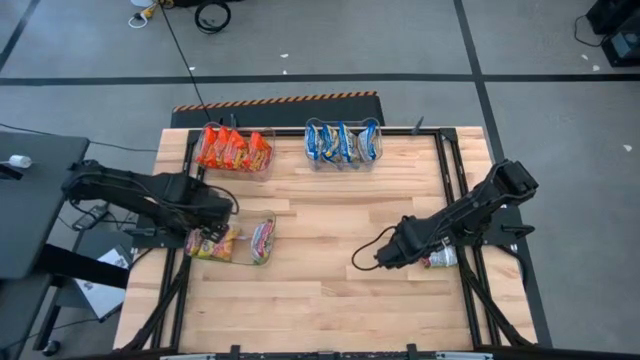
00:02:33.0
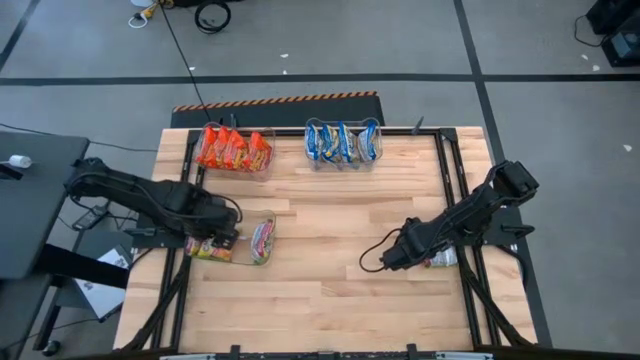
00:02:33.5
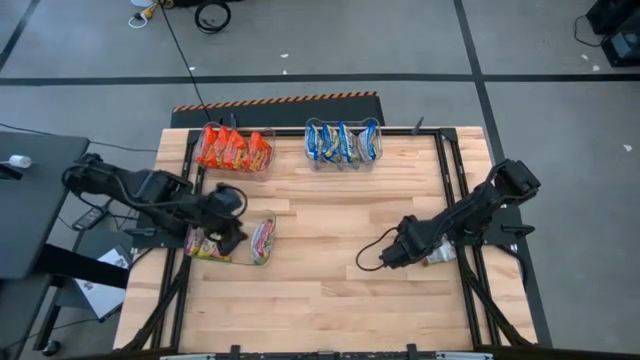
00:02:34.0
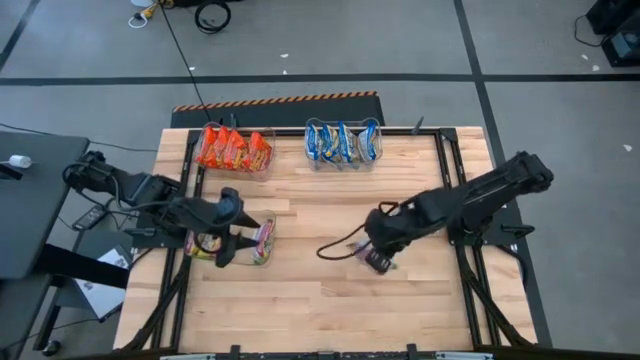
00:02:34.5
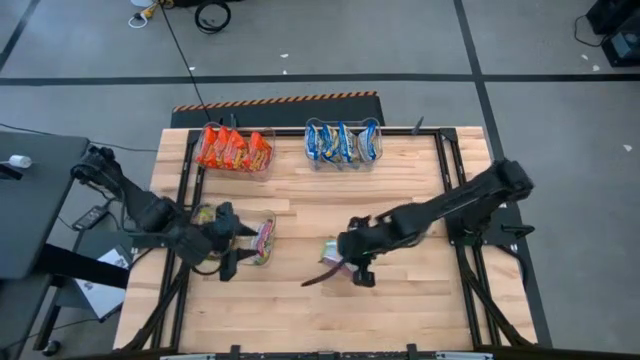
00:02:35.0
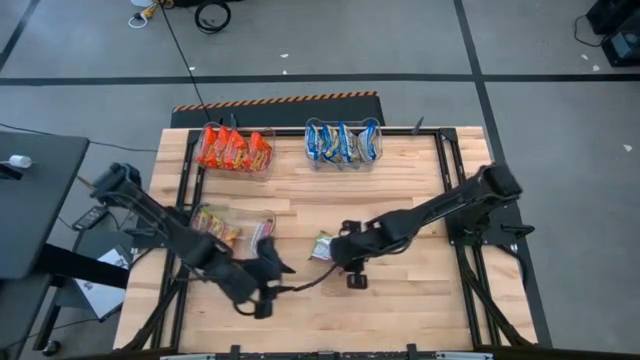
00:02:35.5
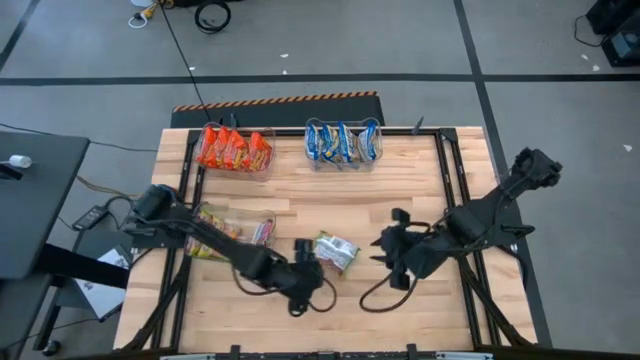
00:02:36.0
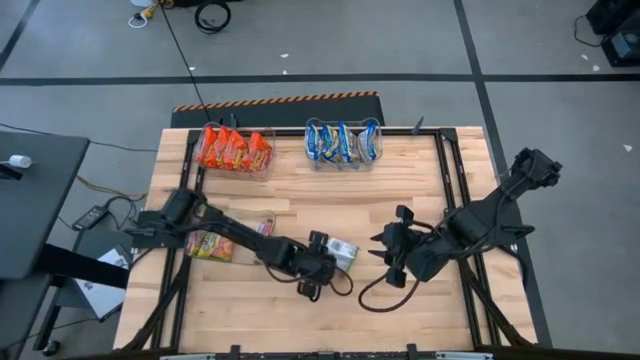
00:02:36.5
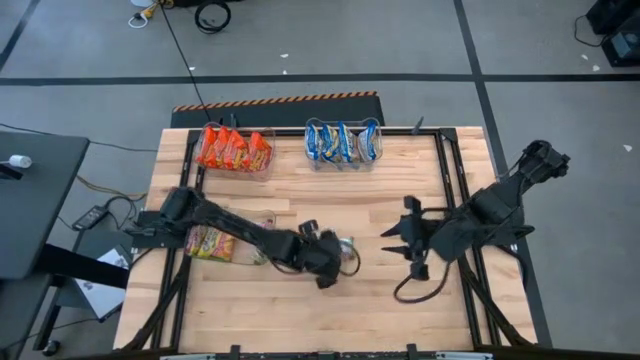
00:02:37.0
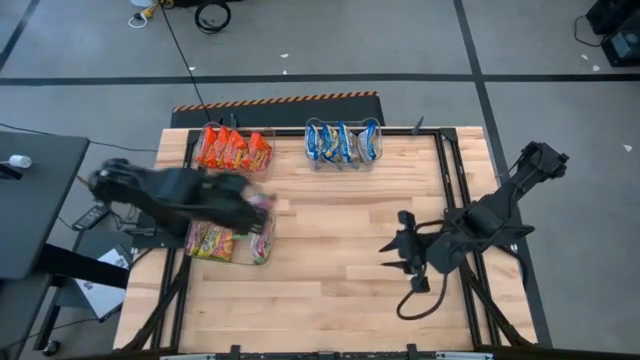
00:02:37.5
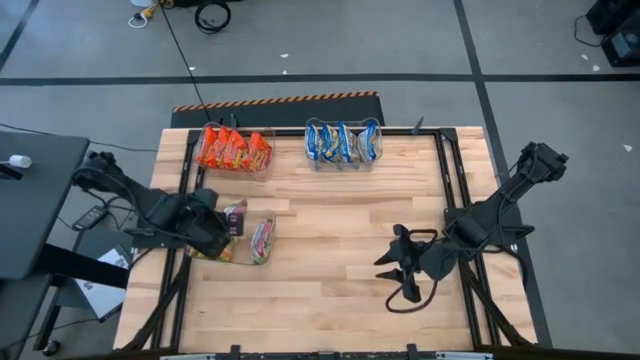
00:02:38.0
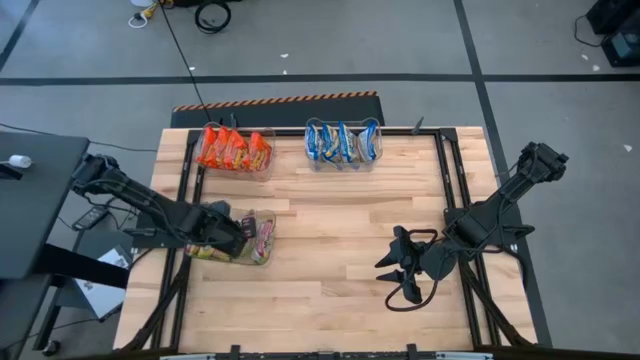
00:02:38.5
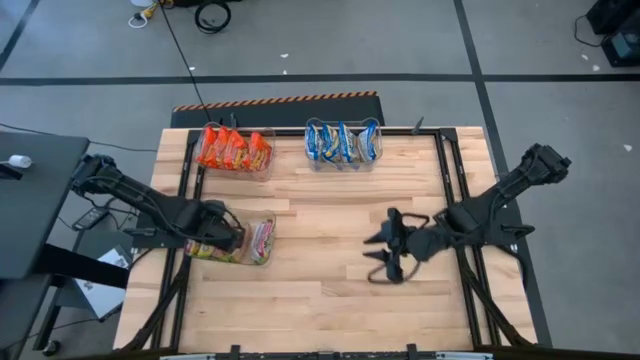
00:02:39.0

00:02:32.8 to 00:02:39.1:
Task: Sort Maruchan noodles
Put the yellow noodle into the bottom transparent bin

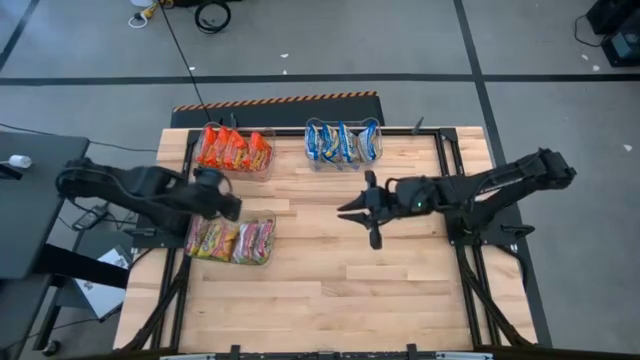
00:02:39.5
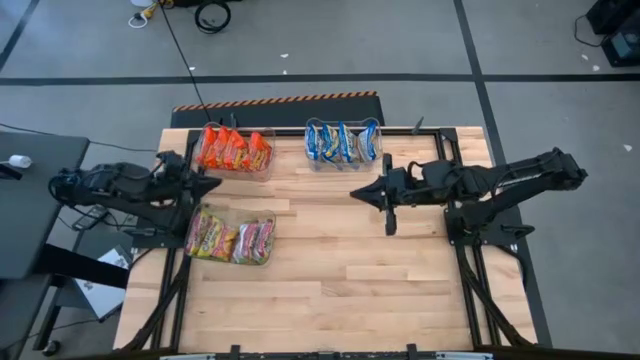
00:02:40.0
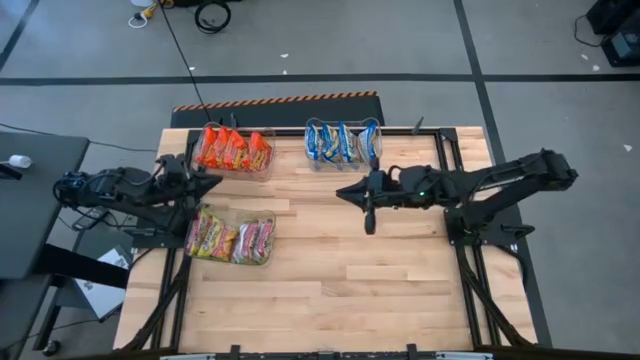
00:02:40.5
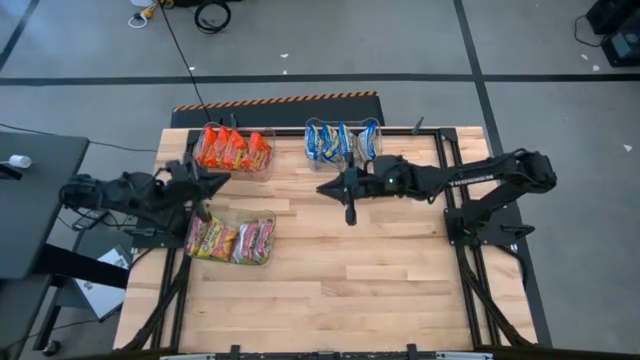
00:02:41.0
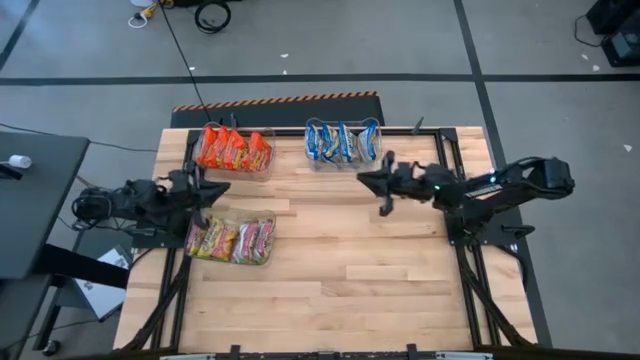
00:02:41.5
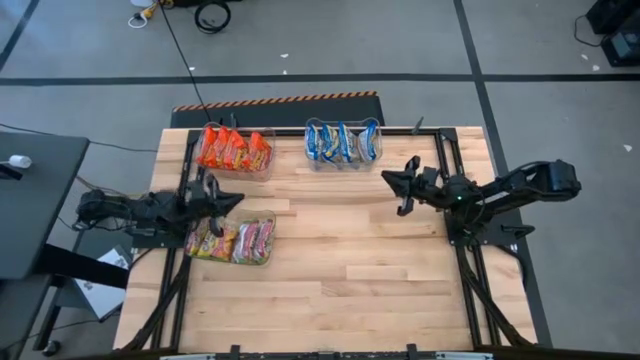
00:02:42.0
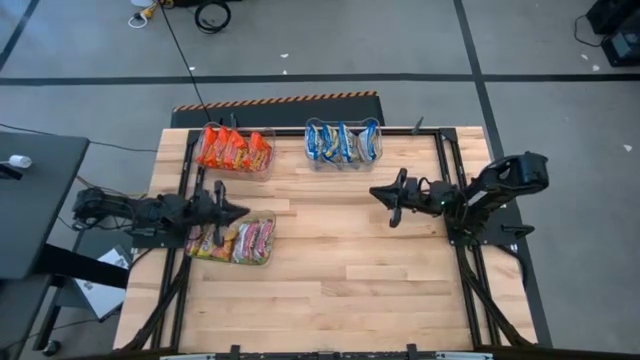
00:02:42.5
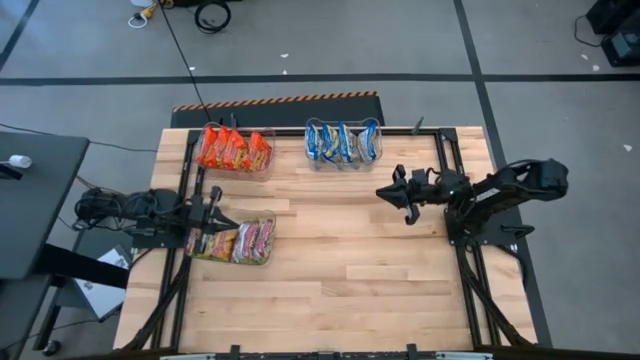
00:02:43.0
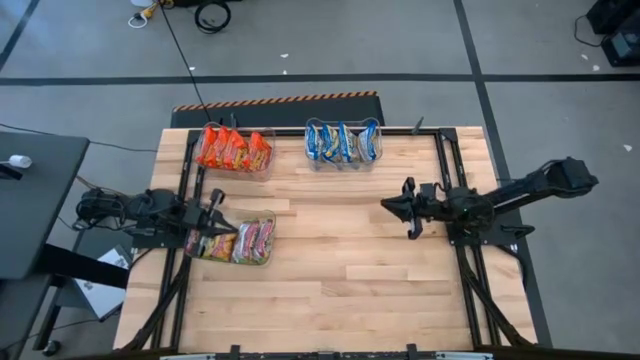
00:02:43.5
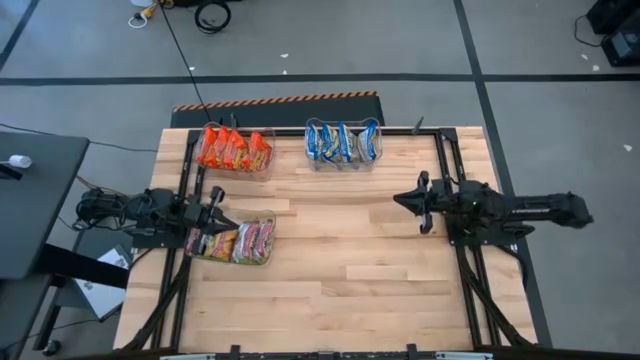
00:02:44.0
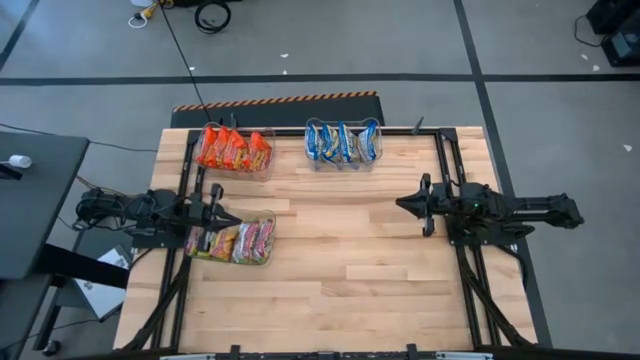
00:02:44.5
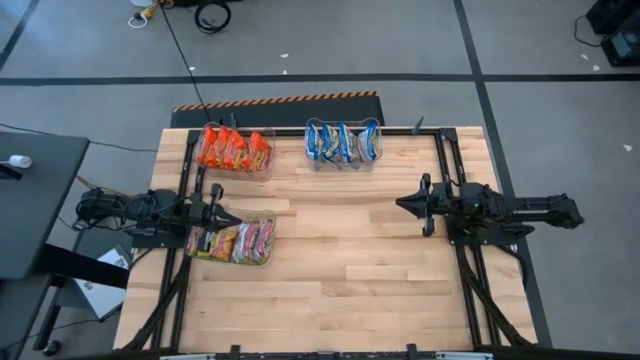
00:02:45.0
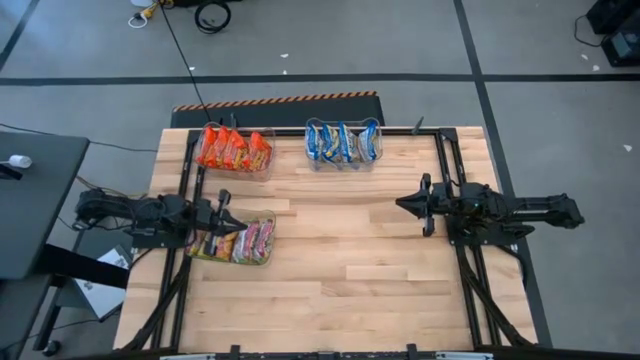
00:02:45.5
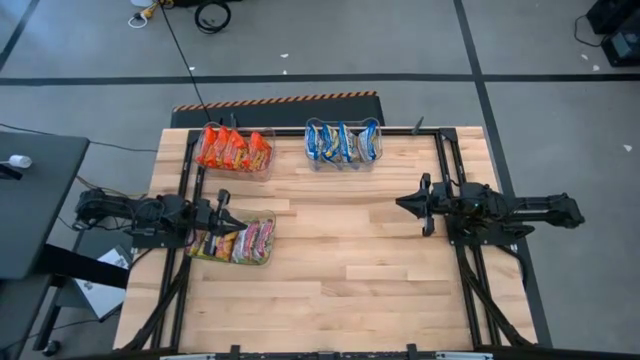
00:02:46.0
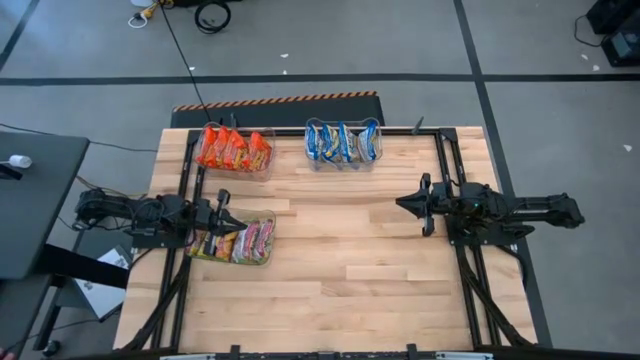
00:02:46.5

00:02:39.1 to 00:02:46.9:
Return to Home Position

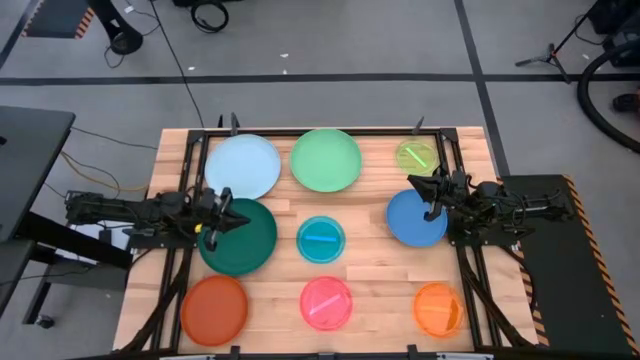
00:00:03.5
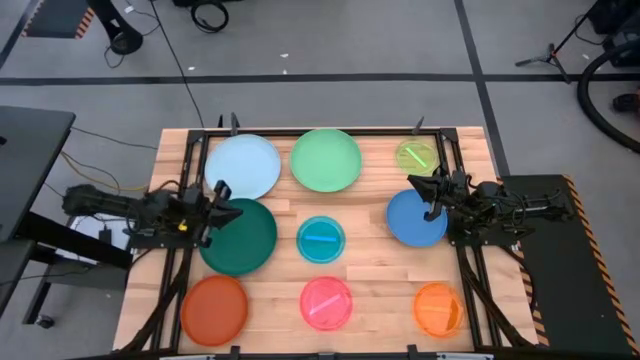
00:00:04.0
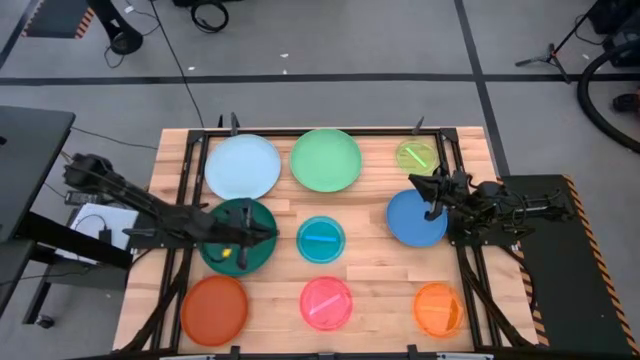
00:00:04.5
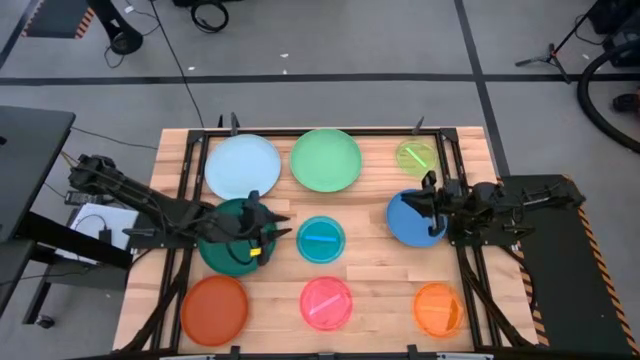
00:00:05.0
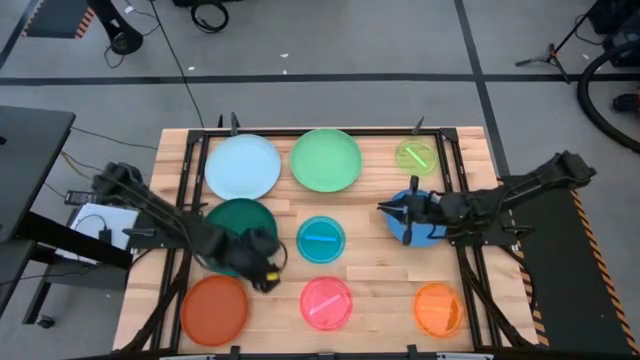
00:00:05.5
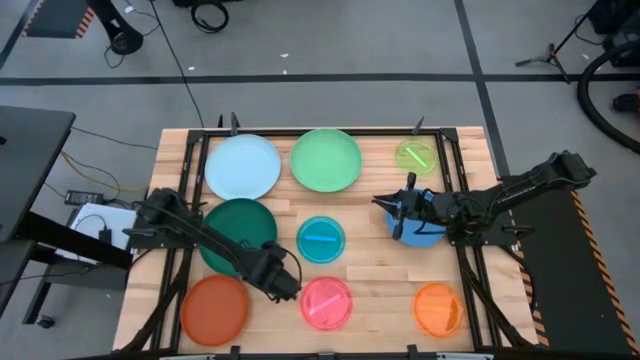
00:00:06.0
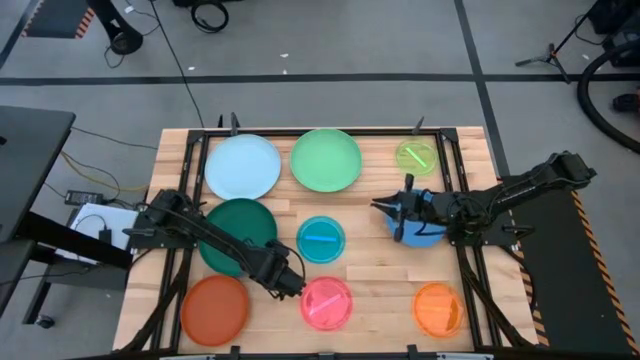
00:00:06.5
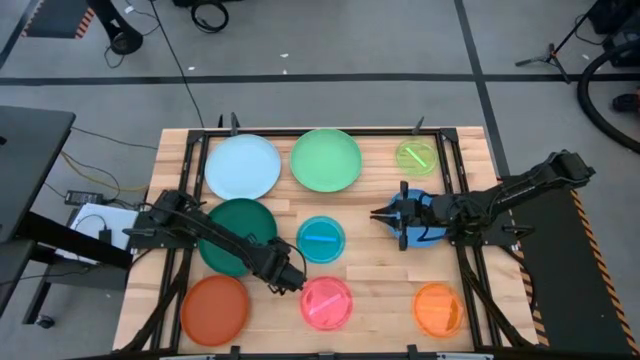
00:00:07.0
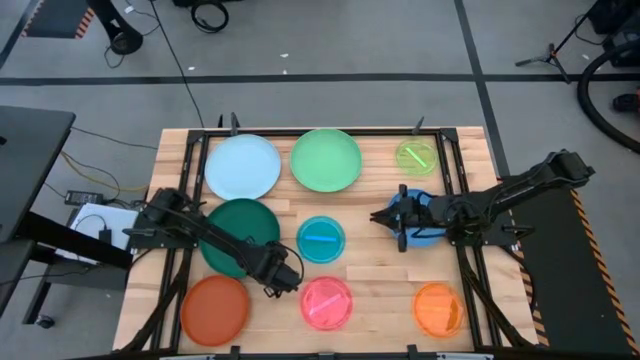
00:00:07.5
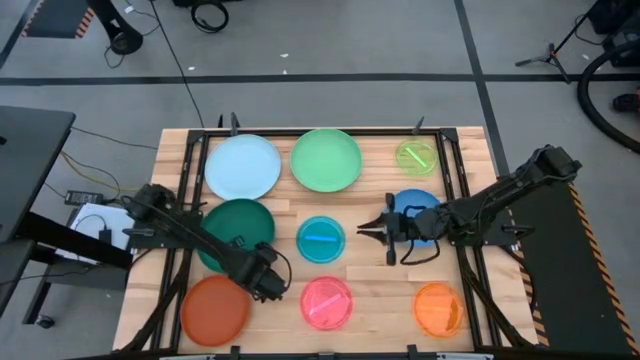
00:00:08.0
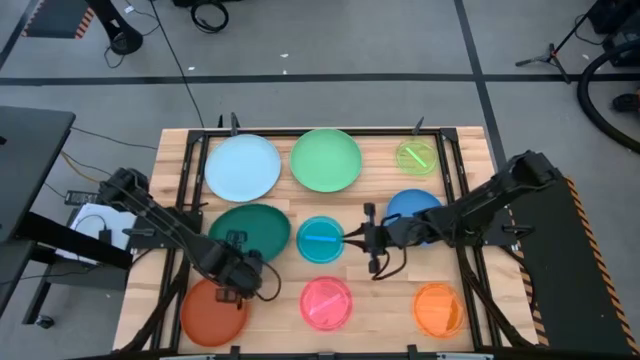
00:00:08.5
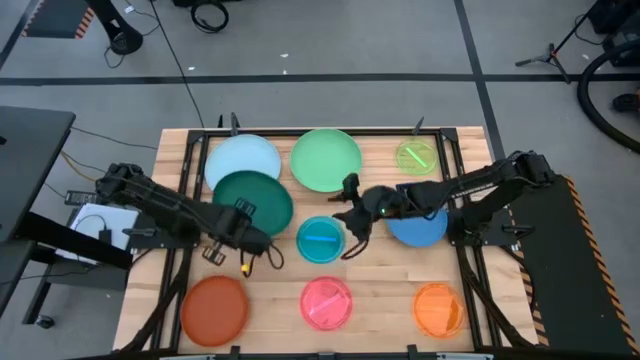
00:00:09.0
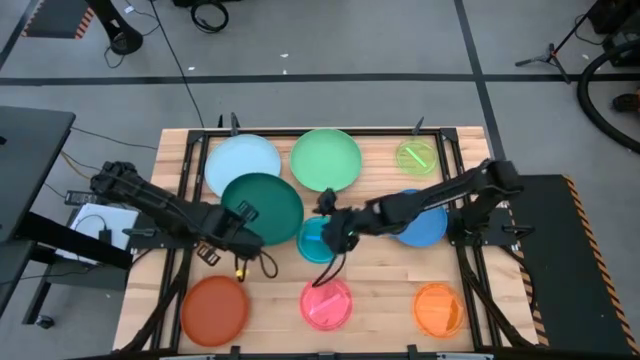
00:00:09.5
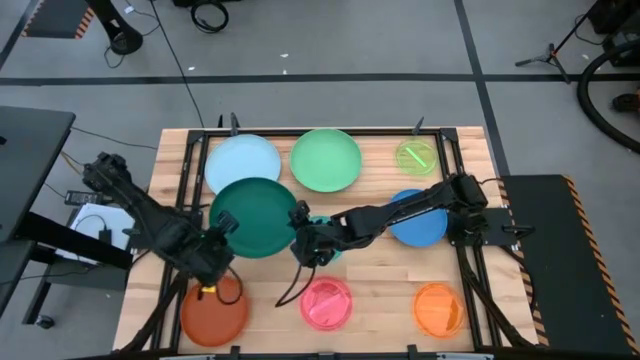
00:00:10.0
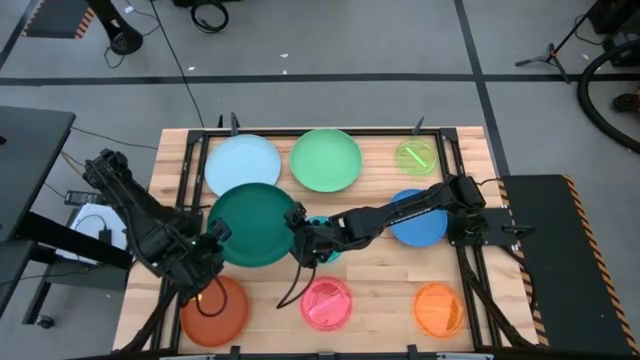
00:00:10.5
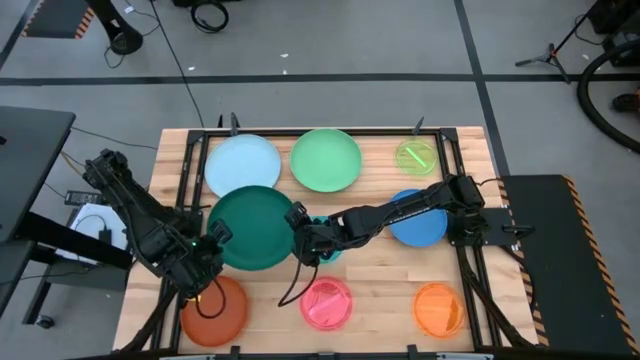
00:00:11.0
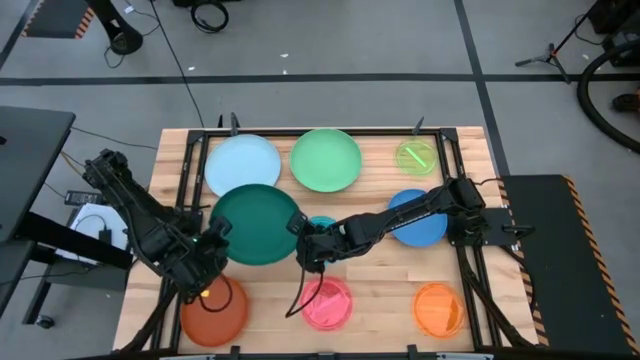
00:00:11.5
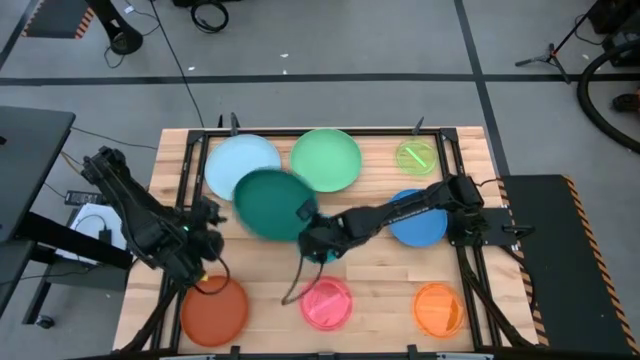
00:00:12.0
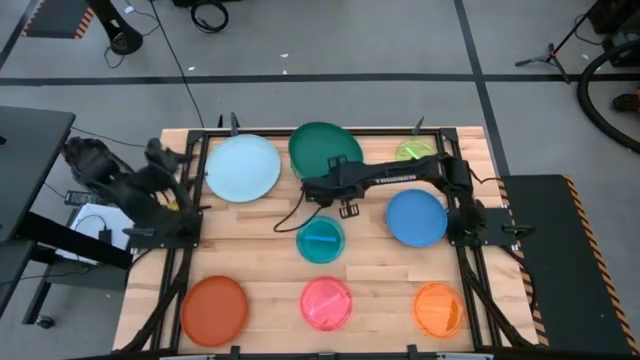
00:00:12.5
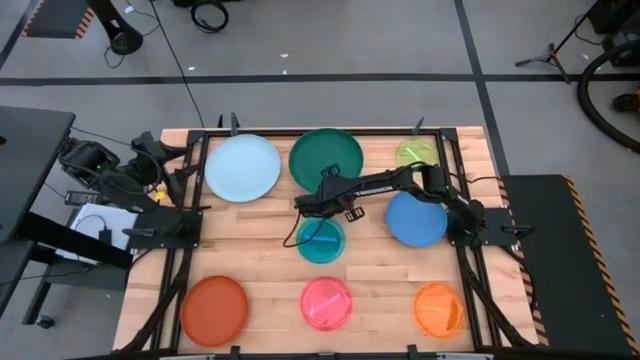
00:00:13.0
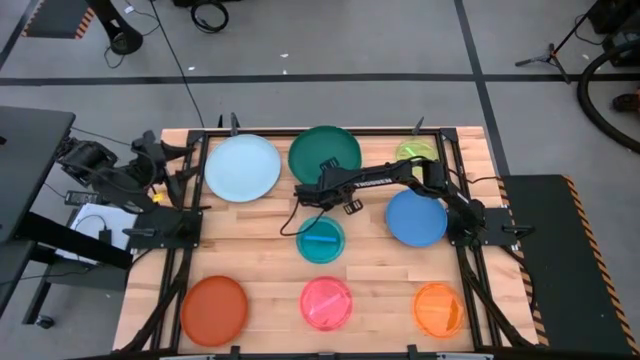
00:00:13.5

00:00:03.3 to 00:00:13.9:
Task: Stack plastic plates
Stack the dark green plate on top of the green plate
